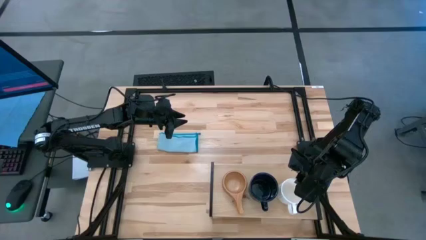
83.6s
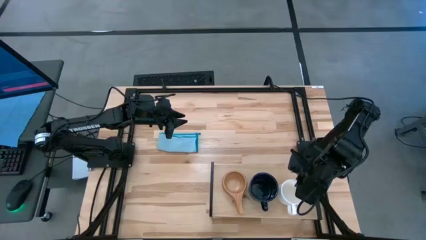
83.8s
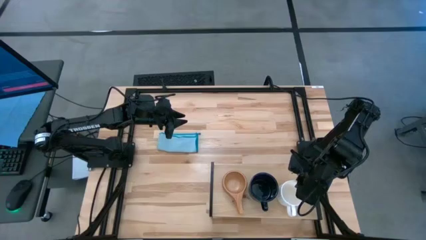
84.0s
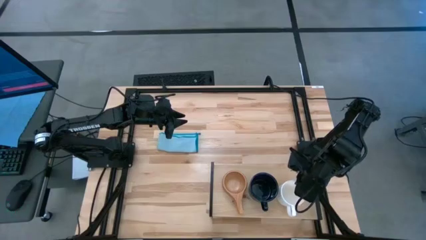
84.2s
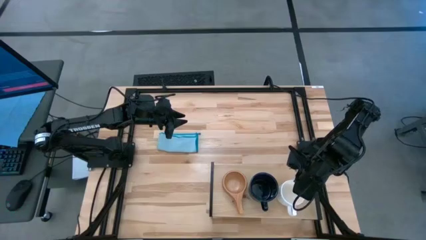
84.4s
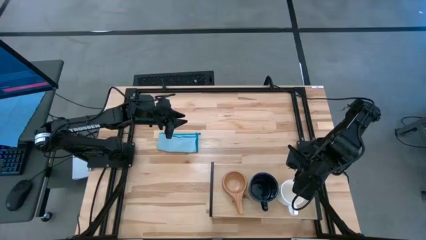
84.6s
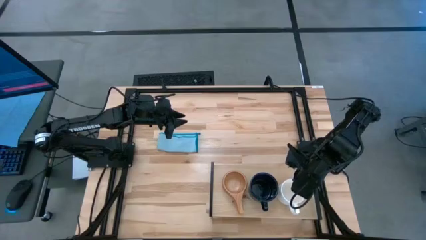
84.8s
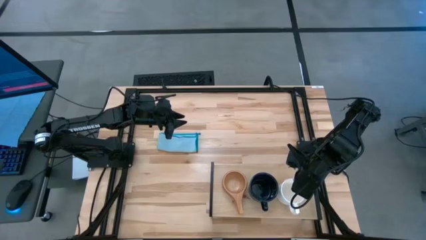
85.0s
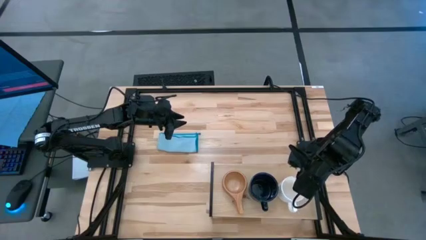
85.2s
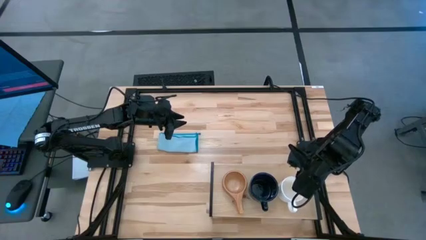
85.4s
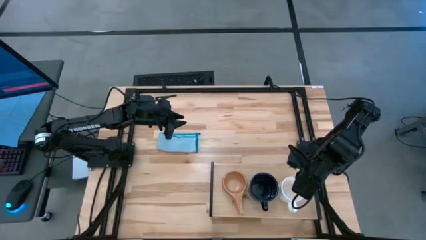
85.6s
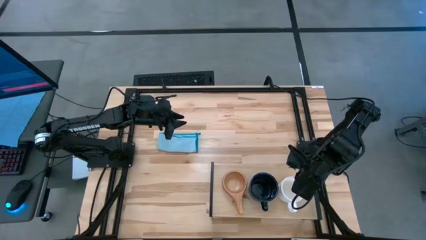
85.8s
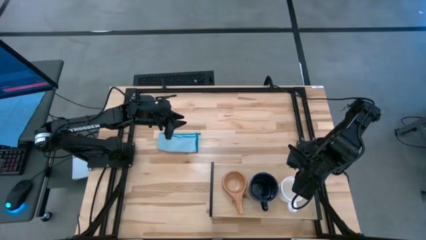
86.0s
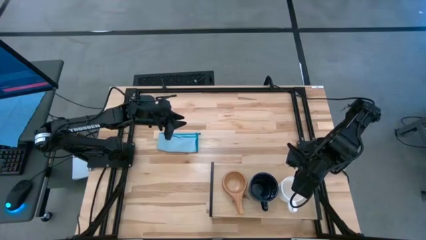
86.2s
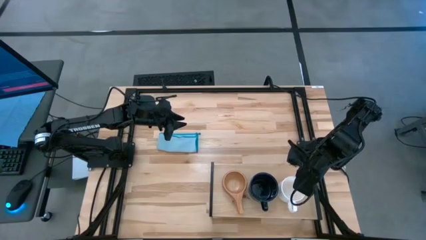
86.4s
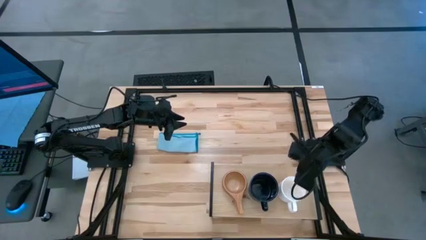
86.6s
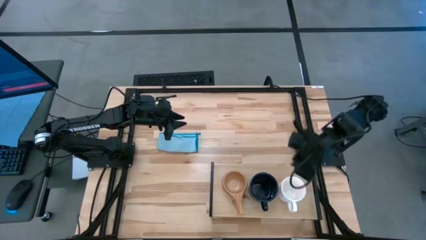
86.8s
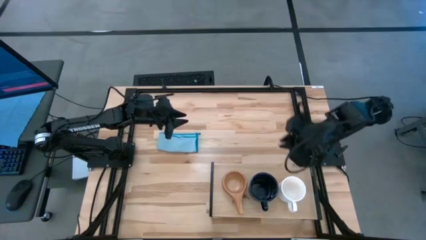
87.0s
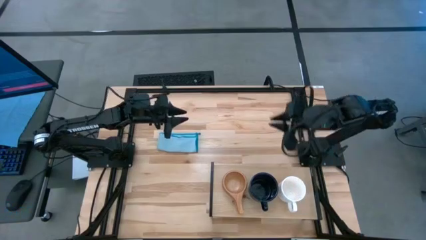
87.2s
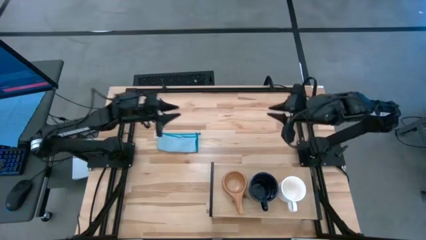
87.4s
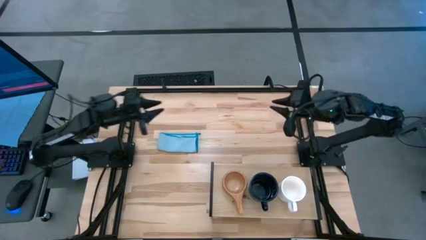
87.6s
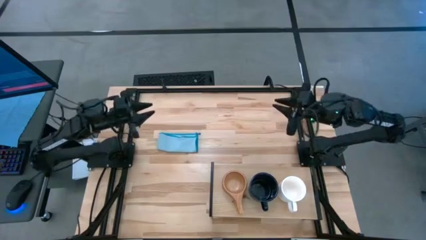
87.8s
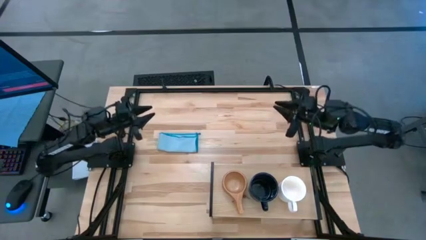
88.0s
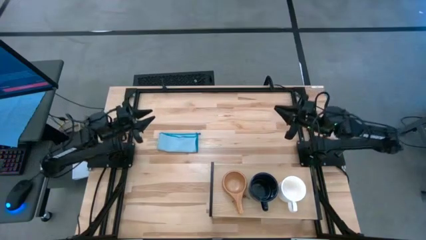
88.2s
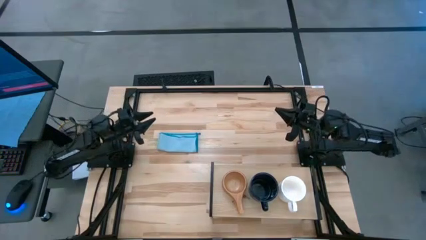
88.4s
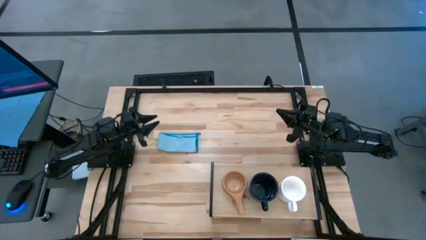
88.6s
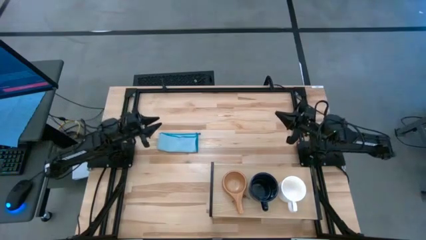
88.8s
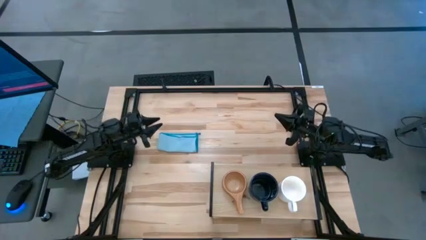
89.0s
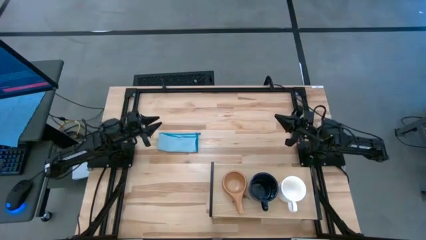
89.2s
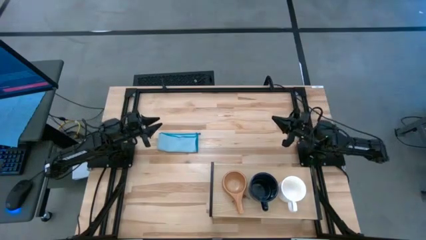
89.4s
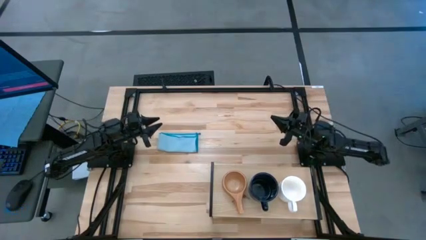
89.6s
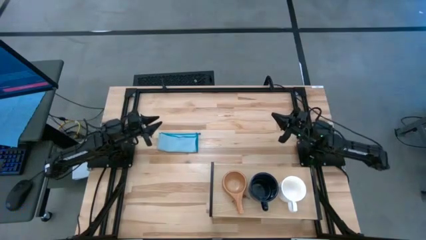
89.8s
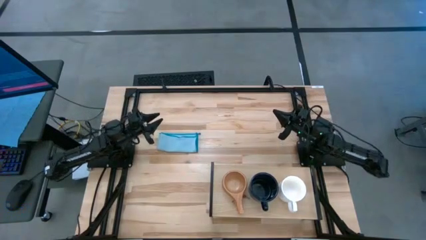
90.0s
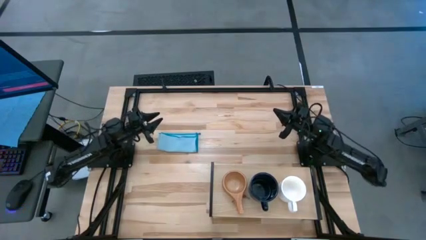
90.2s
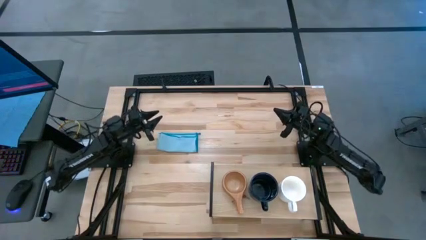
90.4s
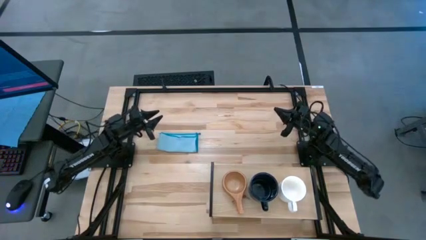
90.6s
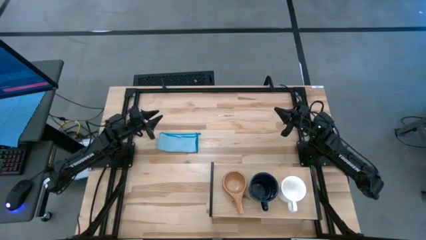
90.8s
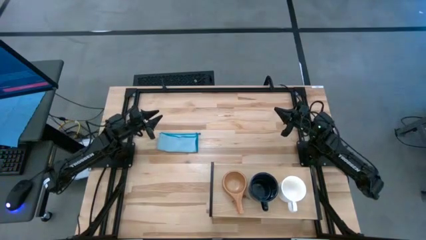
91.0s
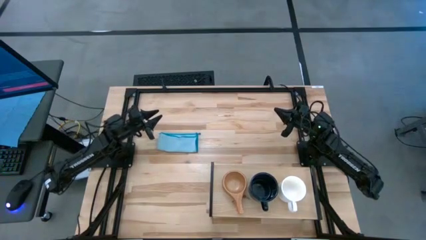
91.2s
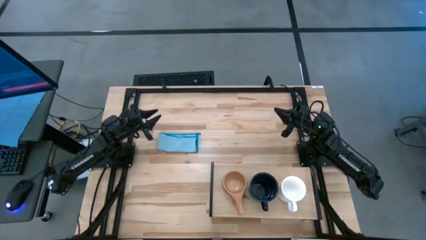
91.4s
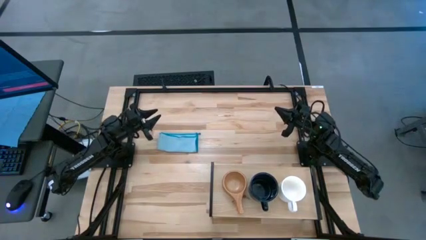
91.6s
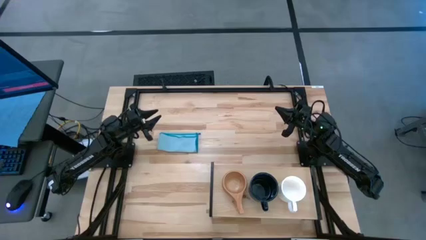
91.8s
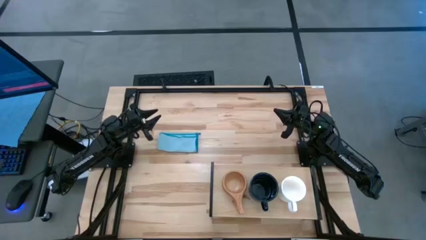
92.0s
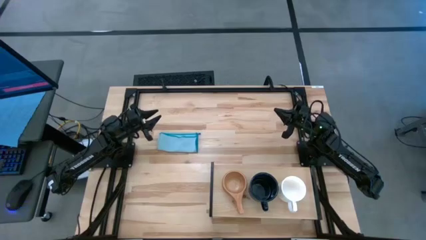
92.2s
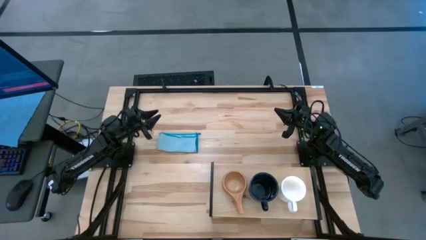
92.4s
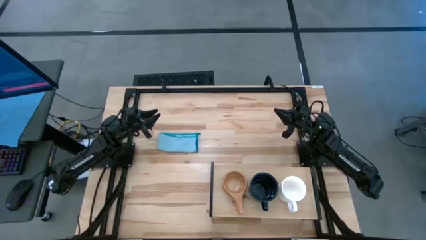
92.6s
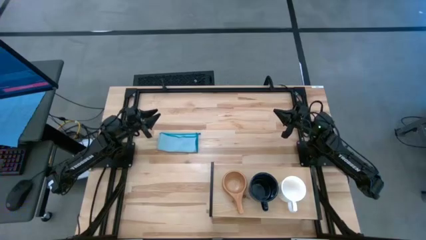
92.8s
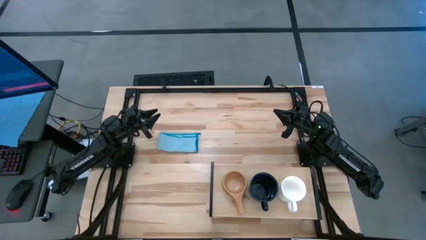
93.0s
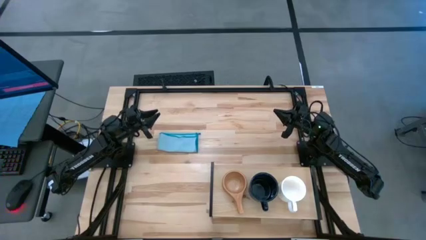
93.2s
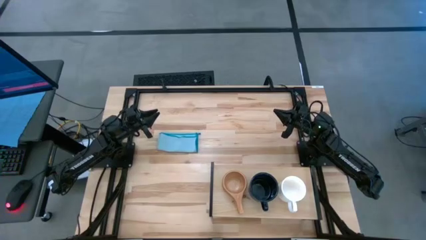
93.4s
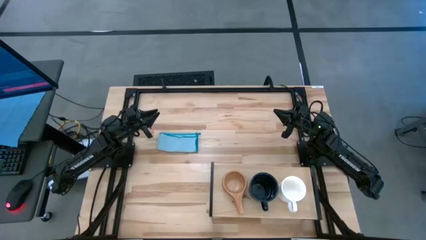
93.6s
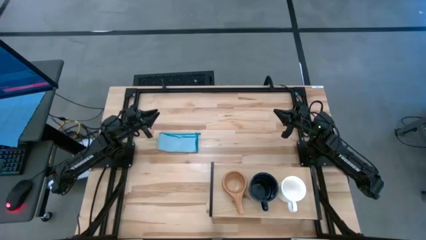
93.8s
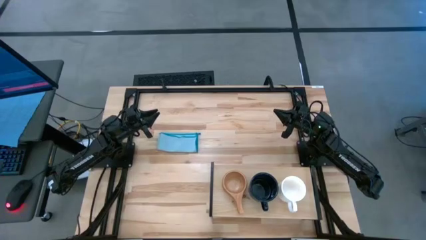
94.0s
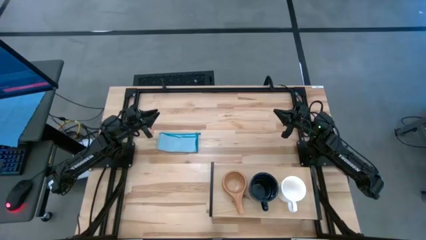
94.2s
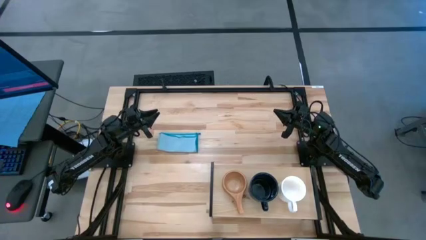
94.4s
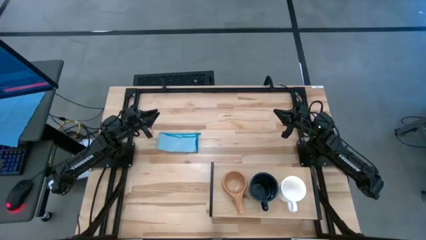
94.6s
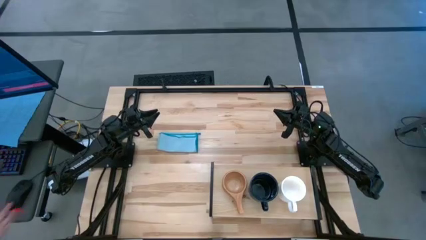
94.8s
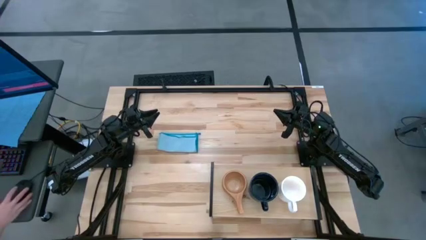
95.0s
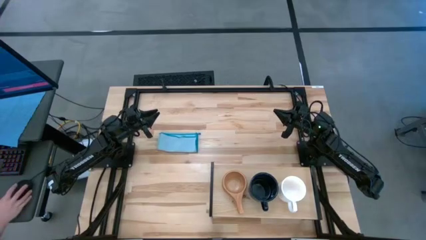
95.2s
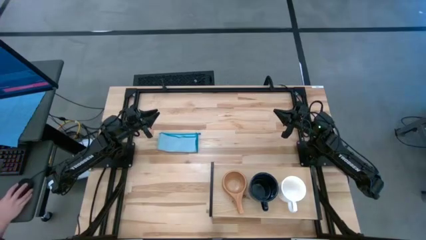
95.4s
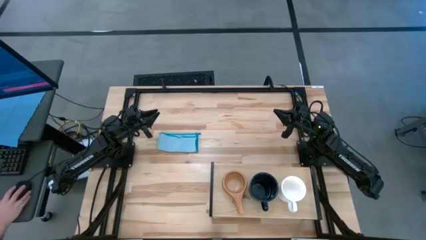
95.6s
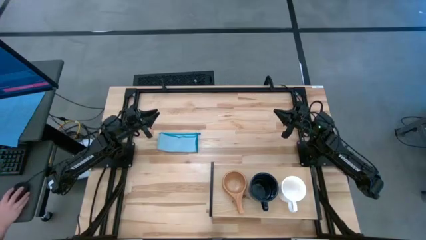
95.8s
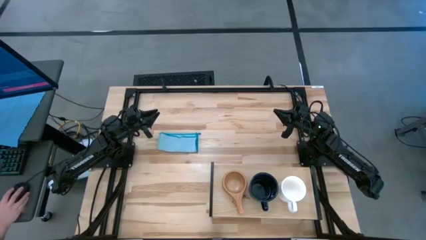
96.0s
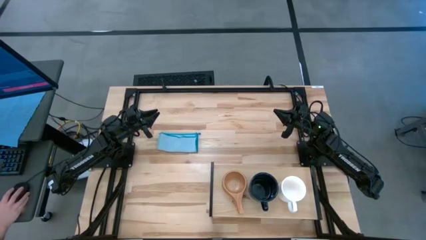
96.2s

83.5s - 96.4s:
Task: Stack small to large cups/mugs on shelf
Return to Home Position

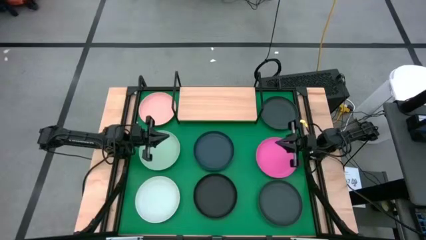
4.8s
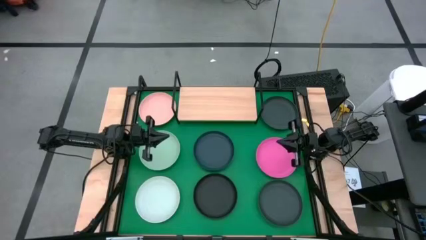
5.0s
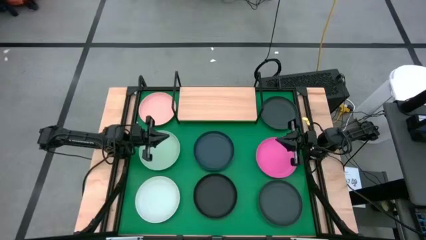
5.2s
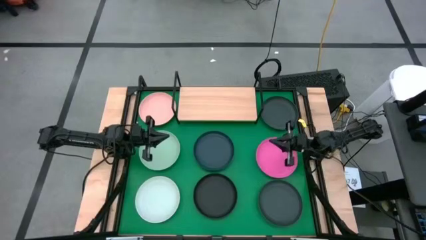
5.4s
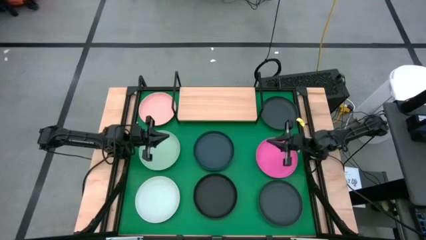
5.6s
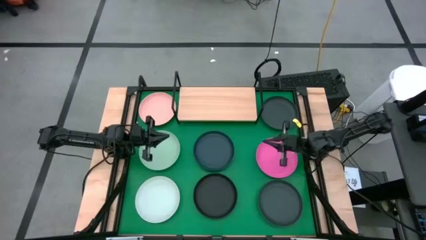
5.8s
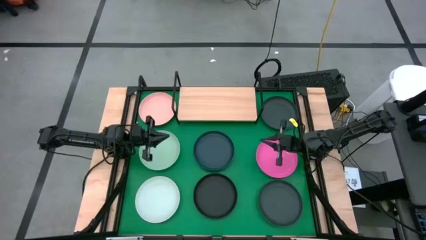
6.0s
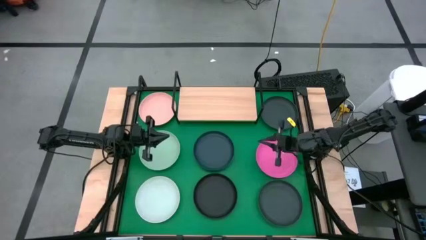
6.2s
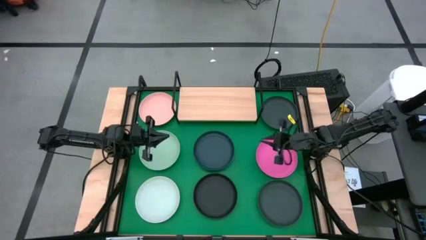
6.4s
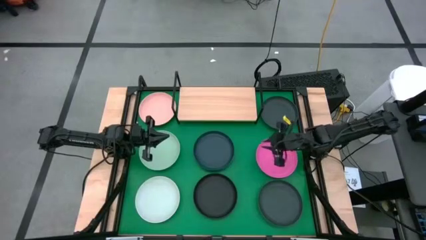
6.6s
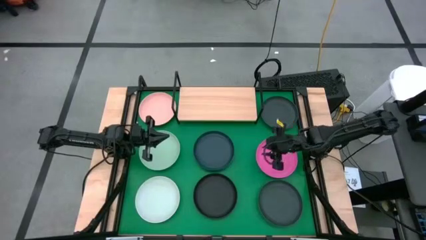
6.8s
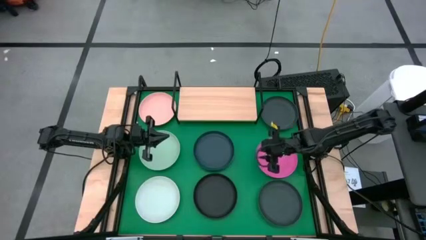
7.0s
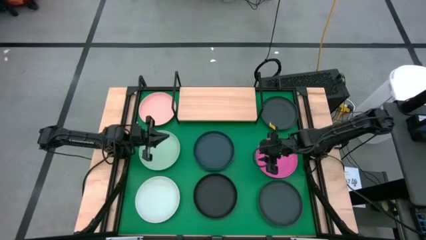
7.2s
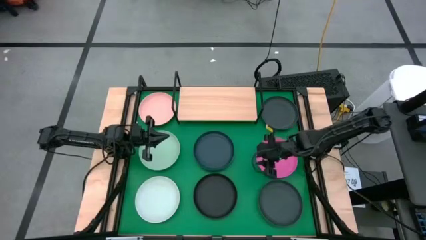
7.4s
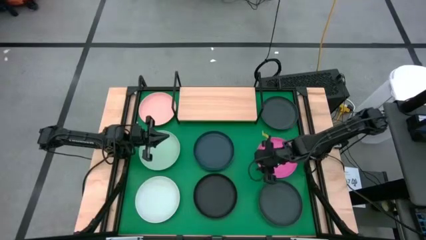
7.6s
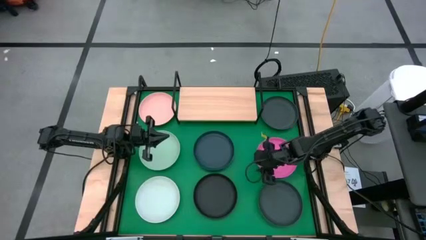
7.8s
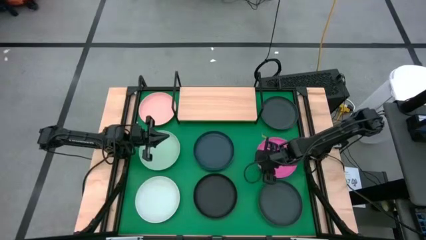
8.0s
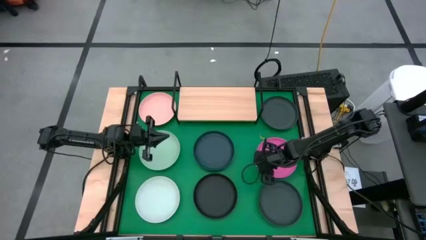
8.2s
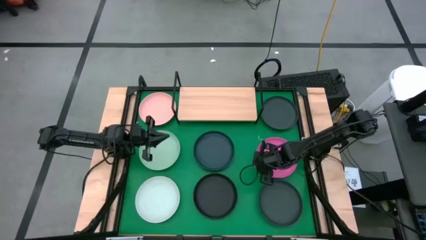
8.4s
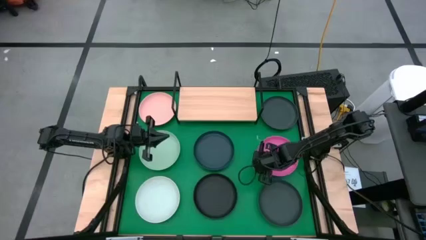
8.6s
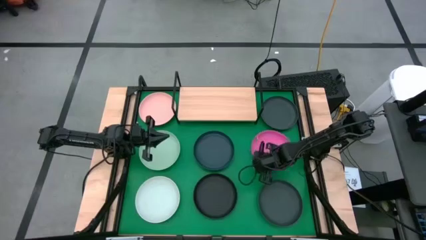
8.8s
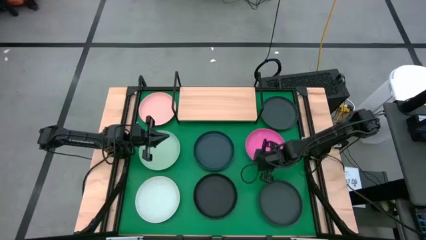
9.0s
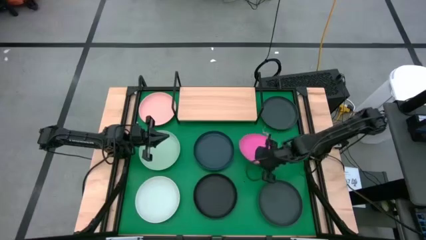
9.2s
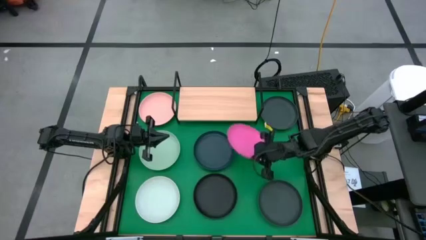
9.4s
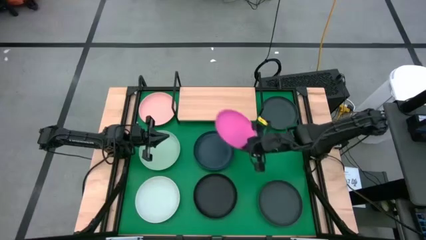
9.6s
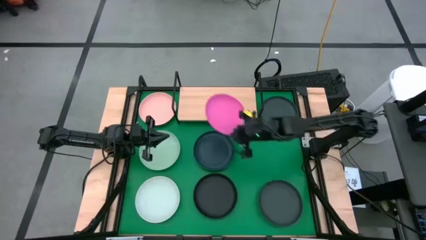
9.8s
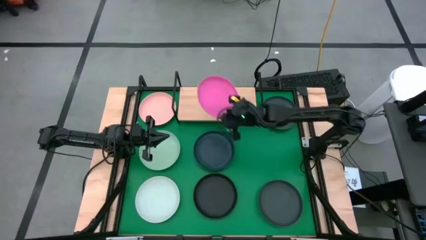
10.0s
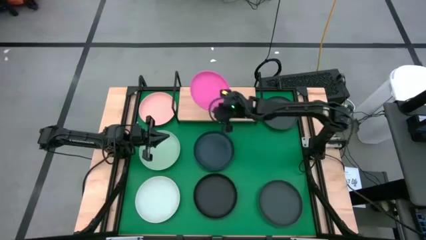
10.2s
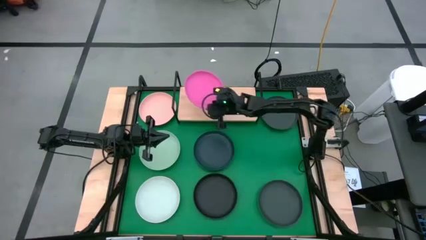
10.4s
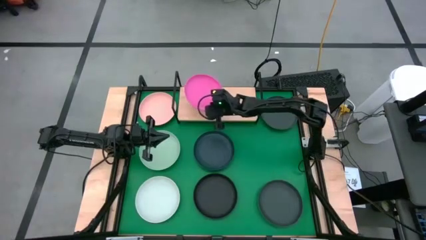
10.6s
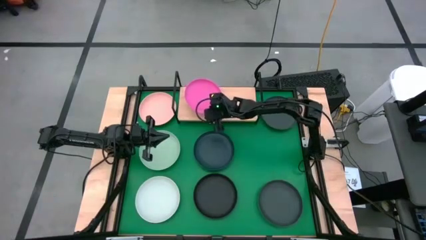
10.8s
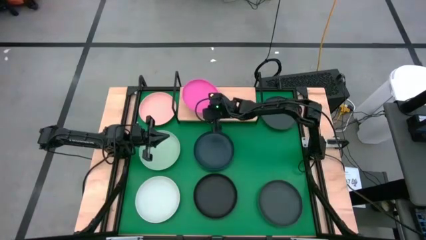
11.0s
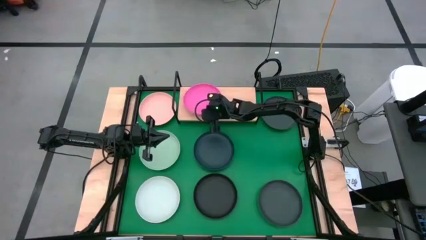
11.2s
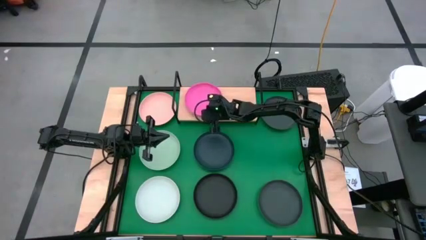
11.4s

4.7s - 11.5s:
Task: Place and stack plates onto a shelf
Put the pink plate on the shelf
